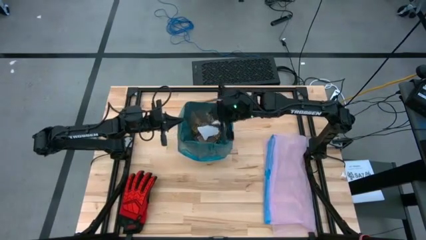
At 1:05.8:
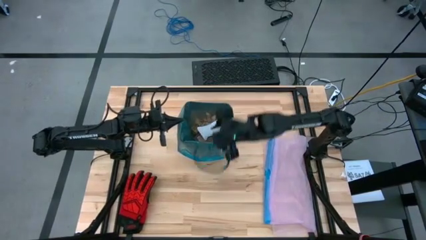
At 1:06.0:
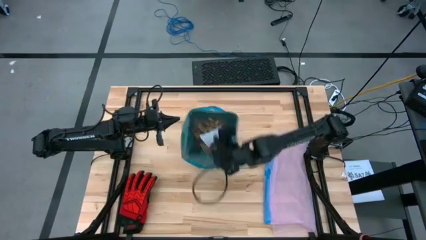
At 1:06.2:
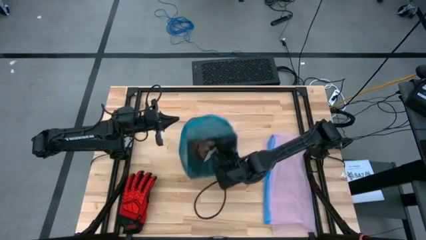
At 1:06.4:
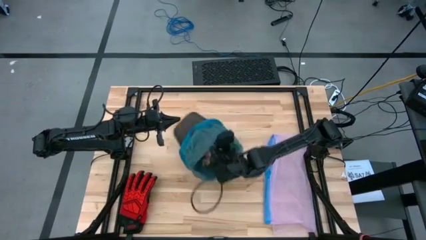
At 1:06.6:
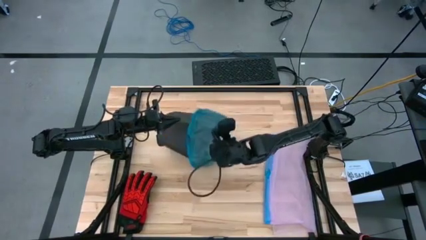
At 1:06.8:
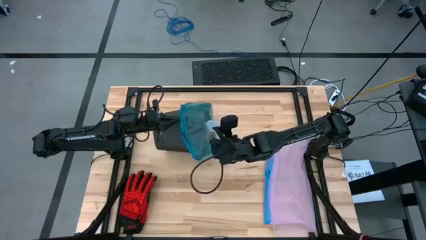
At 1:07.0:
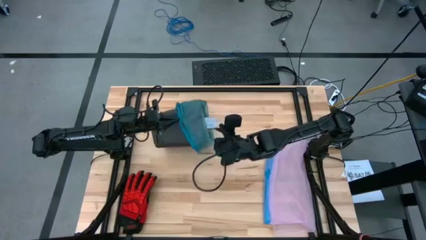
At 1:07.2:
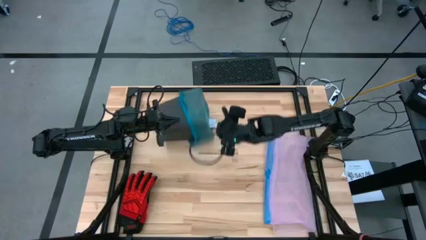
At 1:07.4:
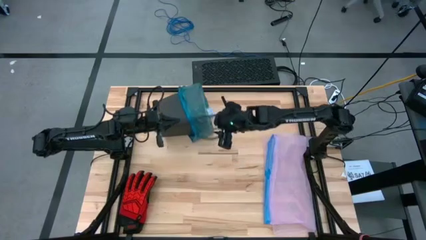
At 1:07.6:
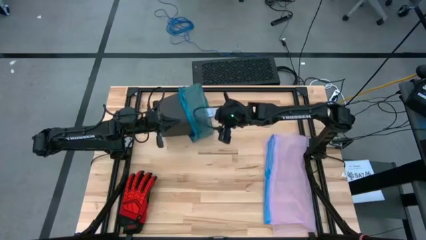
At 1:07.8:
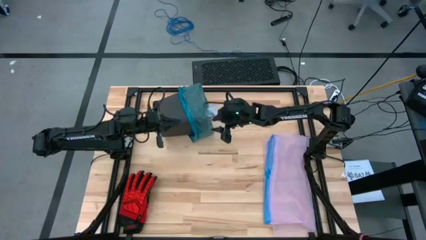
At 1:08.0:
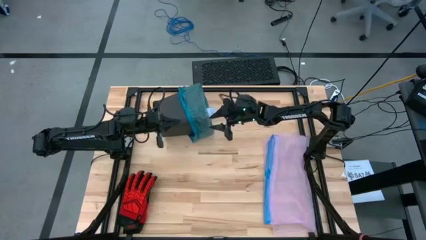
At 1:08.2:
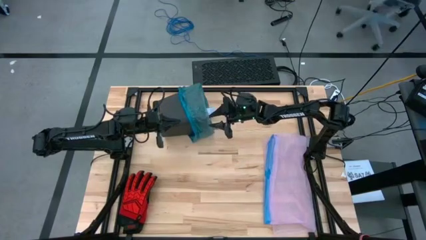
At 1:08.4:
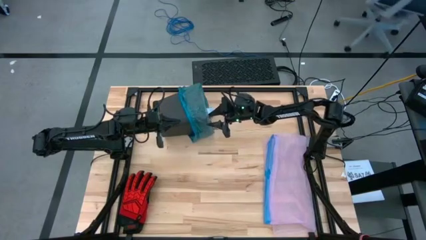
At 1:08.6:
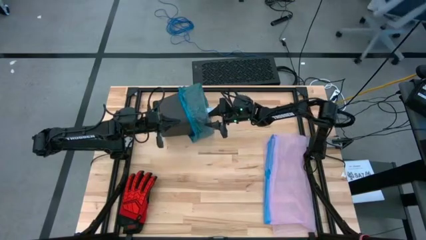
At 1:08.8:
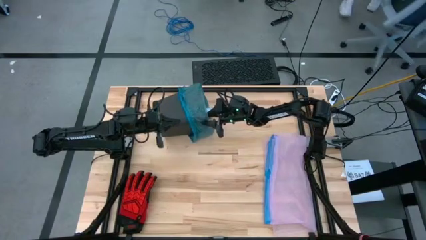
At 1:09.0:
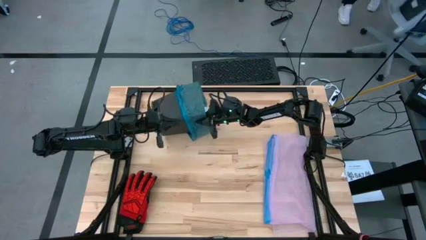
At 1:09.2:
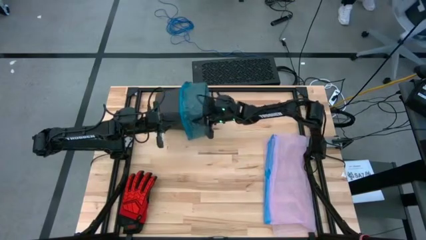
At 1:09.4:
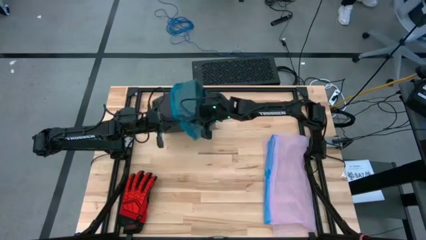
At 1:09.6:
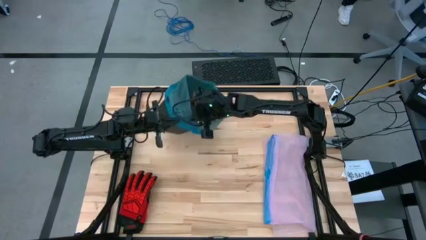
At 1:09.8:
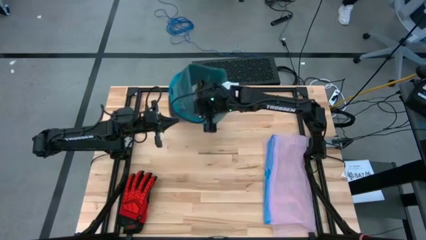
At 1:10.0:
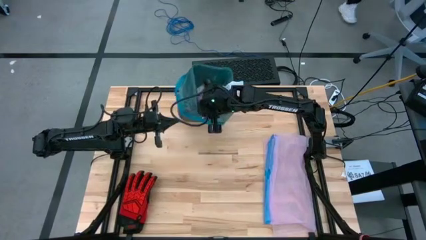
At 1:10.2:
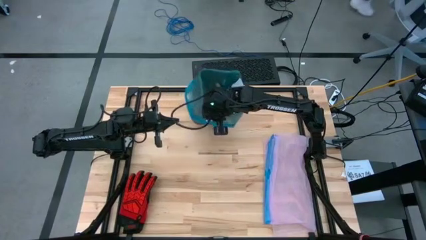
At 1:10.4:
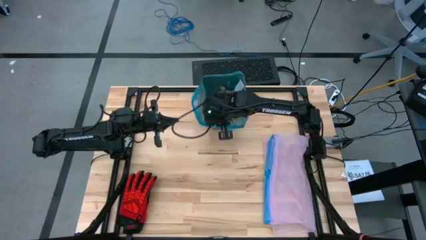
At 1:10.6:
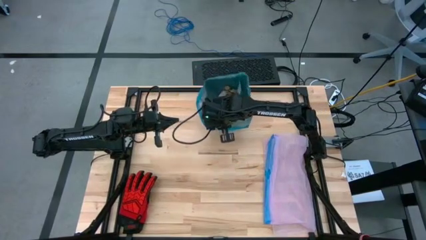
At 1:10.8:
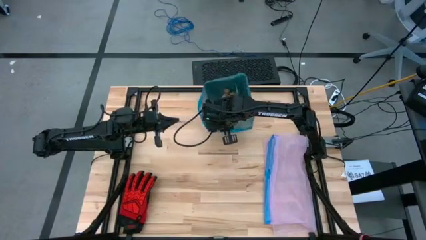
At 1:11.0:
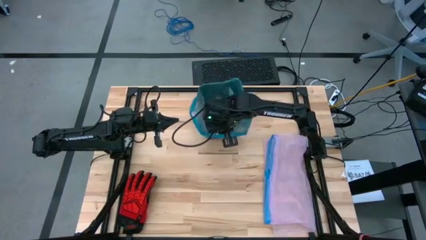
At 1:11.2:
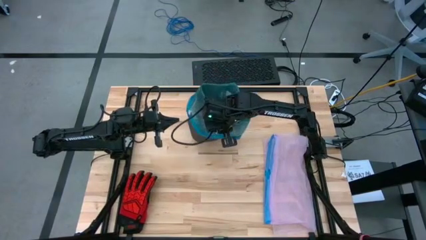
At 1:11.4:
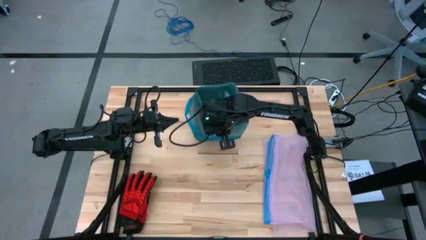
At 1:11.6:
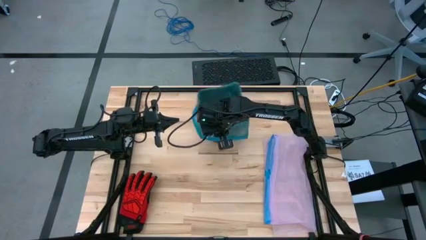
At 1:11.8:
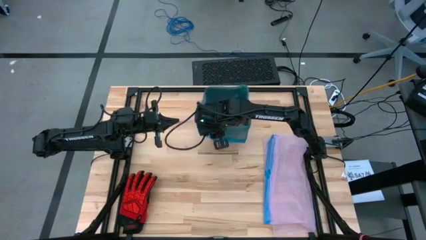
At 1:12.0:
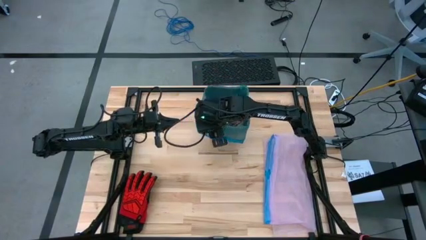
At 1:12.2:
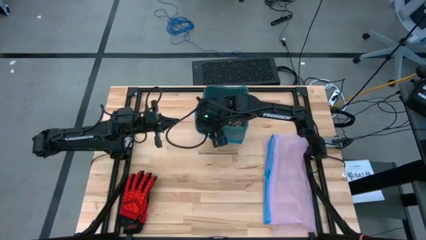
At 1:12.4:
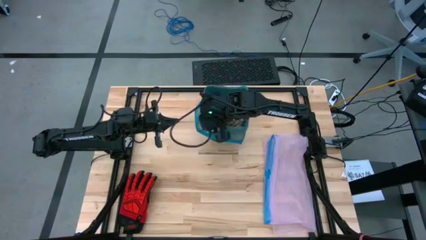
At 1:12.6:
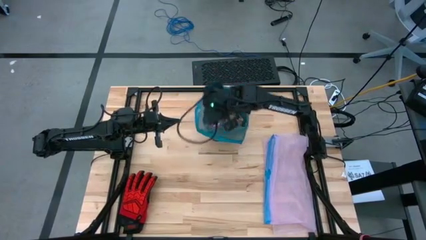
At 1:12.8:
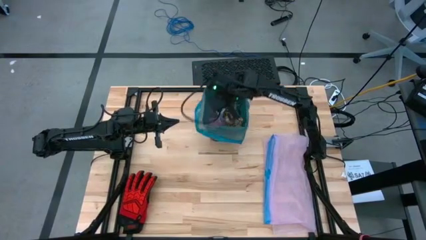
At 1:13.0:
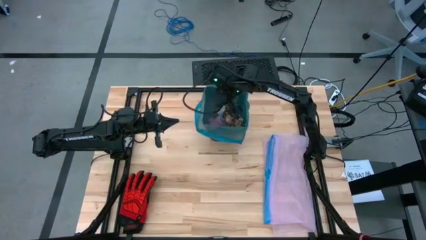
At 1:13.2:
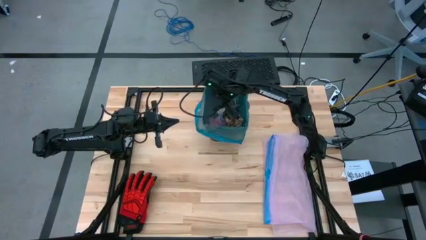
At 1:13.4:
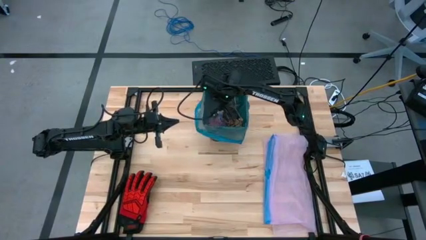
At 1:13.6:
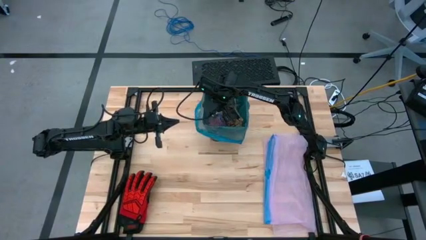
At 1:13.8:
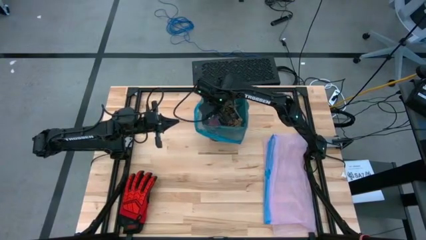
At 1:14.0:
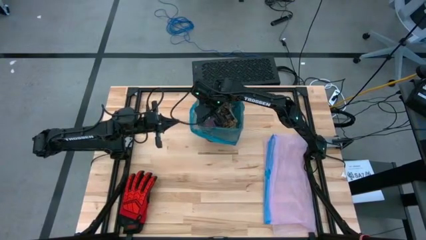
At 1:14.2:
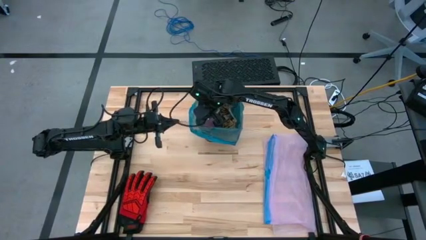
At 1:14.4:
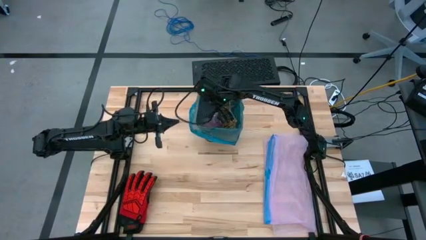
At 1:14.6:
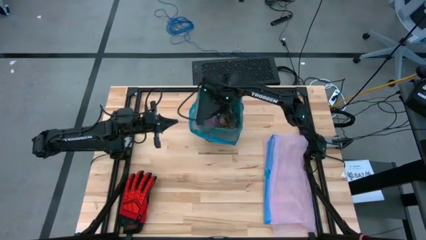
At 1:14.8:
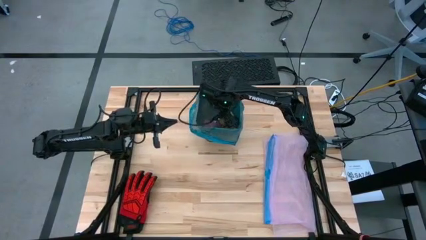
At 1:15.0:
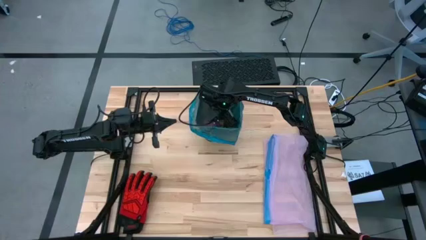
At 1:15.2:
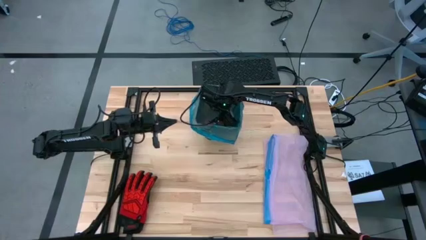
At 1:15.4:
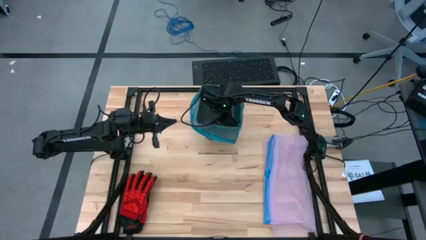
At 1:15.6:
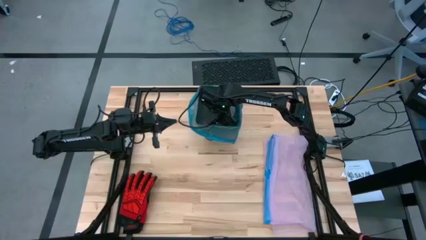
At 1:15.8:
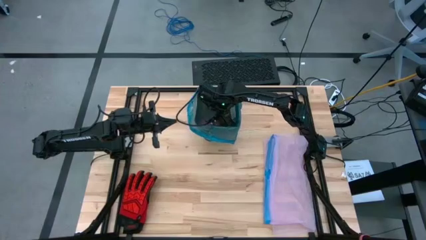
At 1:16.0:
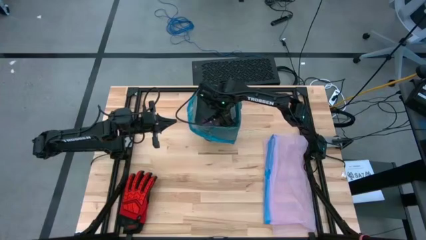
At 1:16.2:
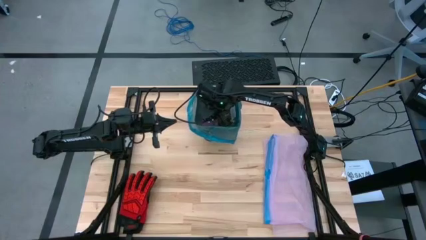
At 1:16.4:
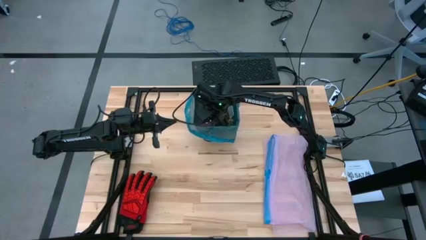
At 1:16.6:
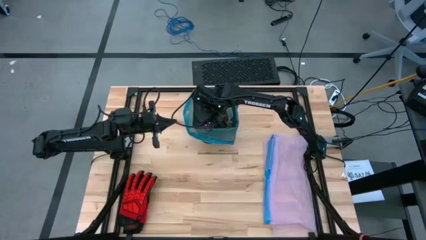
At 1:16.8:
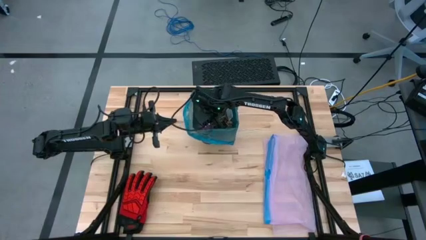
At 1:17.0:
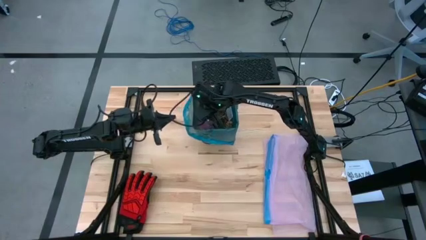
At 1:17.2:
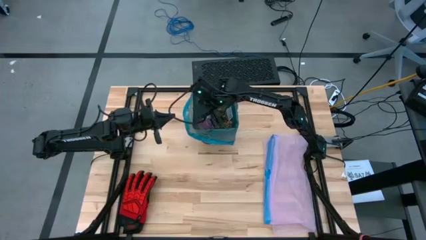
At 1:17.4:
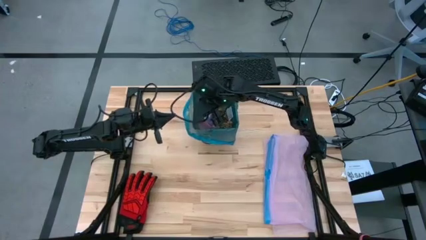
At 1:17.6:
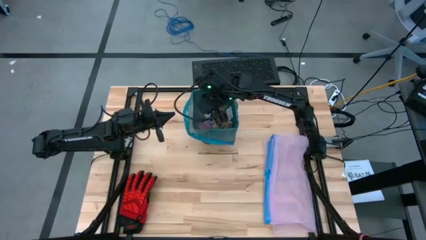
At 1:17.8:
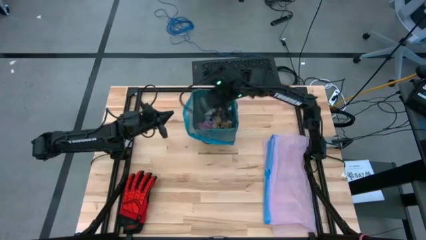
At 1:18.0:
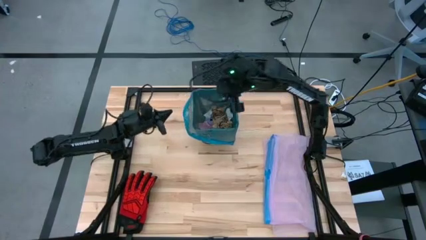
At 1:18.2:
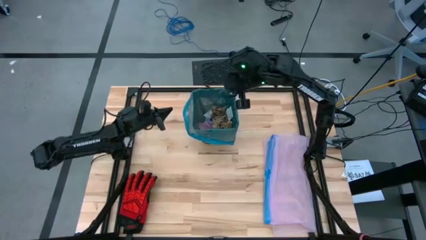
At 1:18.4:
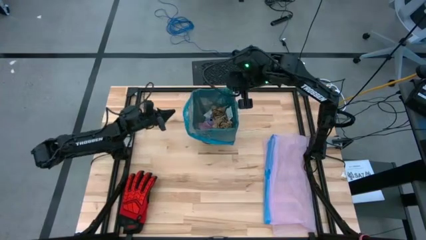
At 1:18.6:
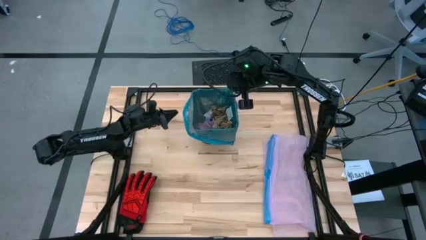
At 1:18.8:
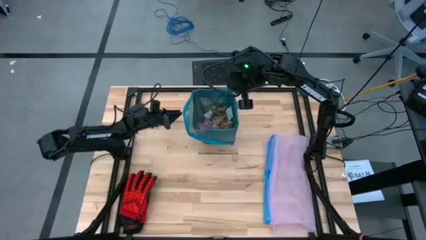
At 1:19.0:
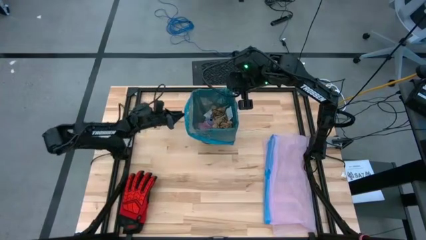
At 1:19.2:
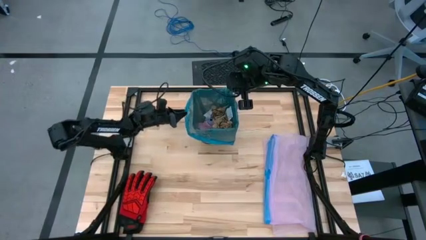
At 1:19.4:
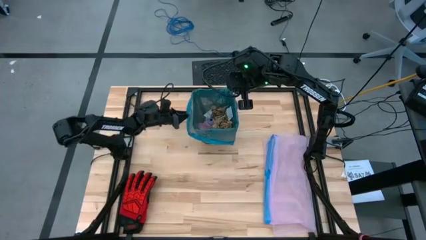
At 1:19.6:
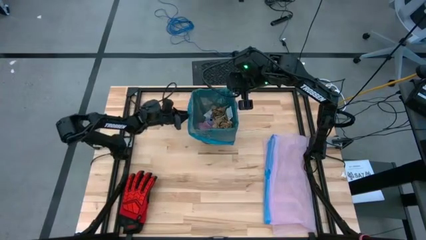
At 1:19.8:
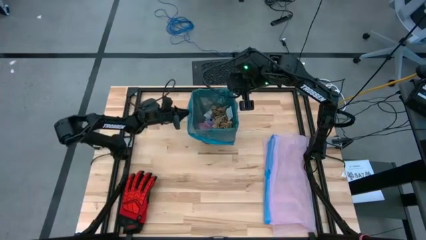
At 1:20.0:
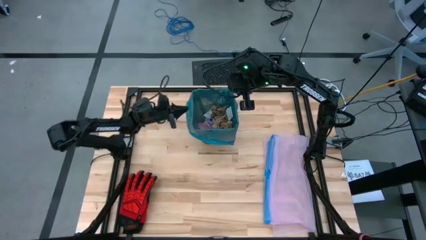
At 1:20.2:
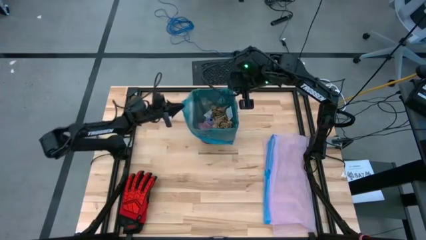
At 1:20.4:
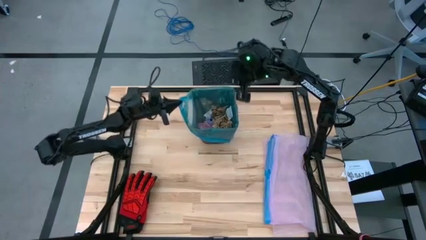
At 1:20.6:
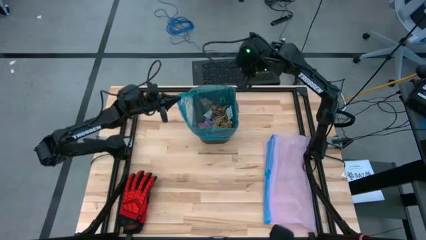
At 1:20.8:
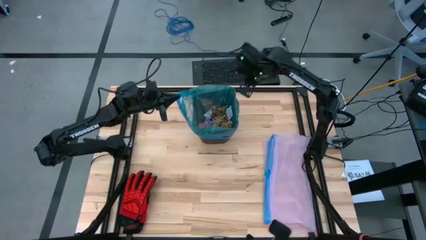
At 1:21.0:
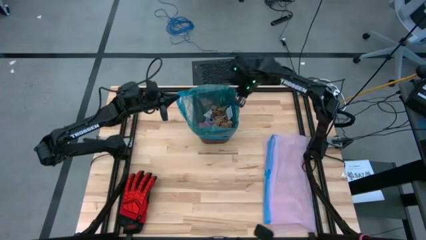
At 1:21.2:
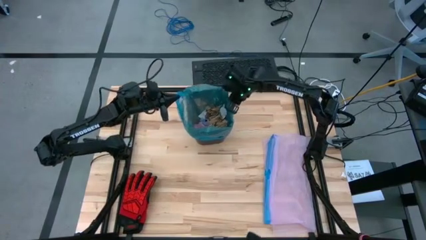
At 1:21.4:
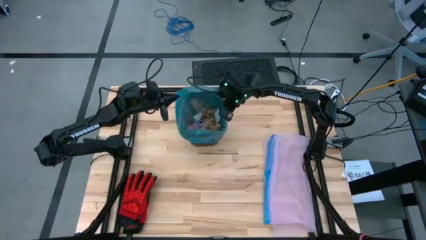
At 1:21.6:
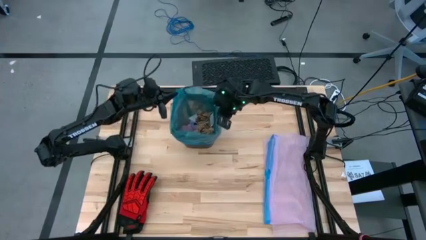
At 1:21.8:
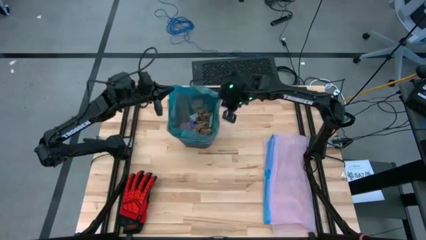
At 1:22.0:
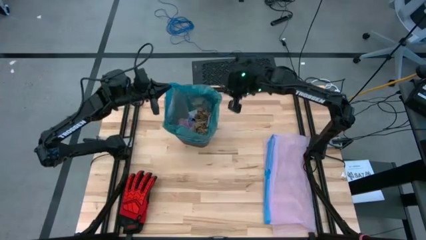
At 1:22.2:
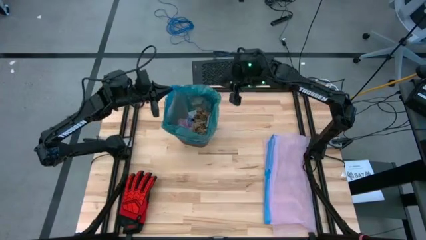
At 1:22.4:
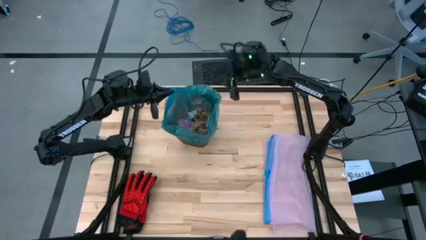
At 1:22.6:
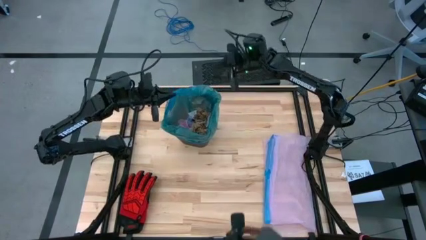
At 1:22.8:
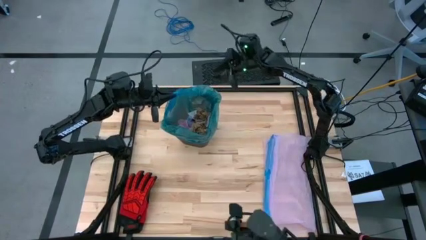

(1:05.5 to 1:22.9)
Task: place trash/remove bag and relplace
Remove the blue trash bag from the trash bin
